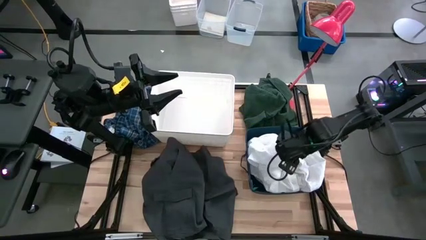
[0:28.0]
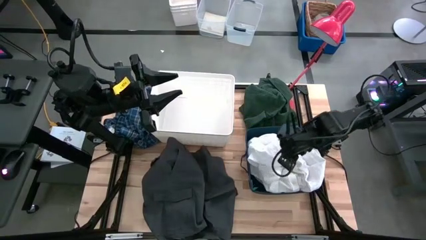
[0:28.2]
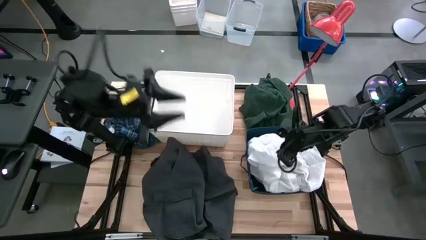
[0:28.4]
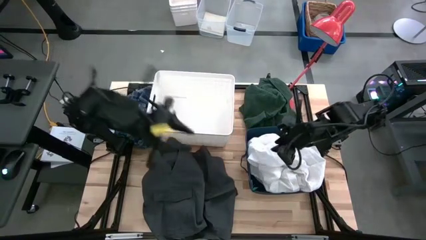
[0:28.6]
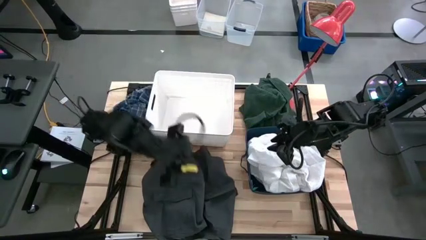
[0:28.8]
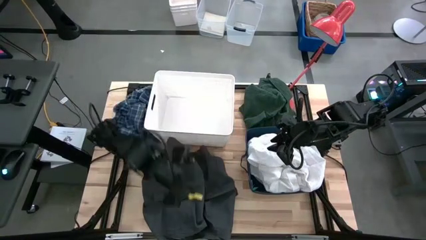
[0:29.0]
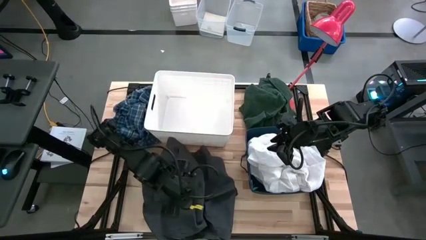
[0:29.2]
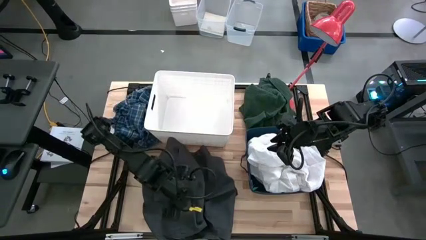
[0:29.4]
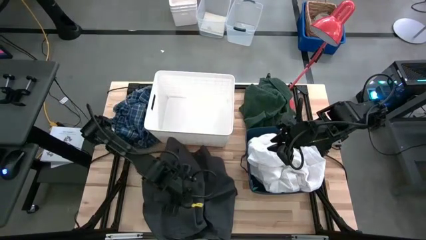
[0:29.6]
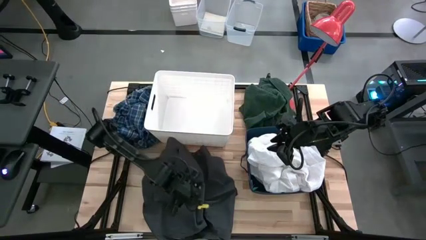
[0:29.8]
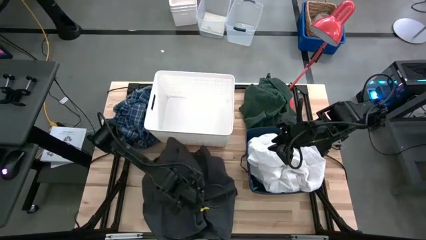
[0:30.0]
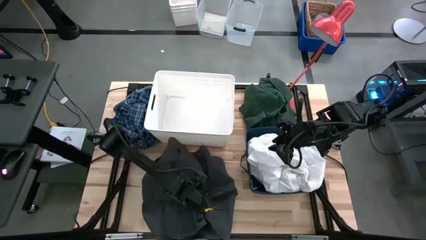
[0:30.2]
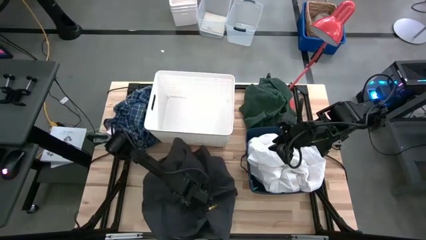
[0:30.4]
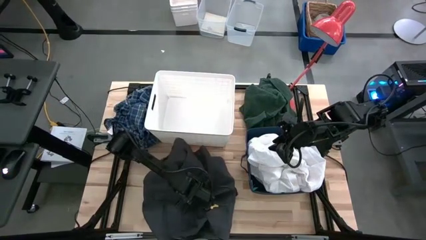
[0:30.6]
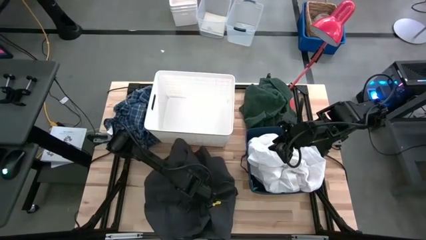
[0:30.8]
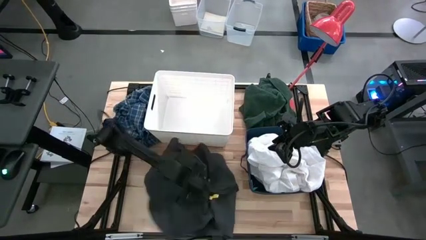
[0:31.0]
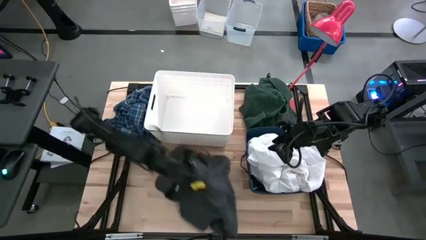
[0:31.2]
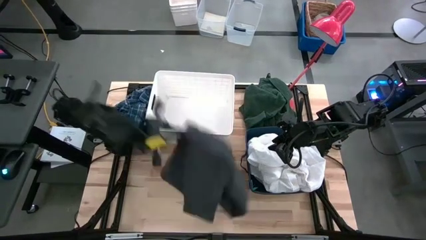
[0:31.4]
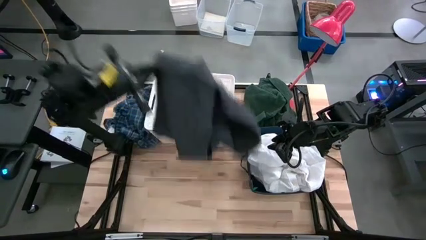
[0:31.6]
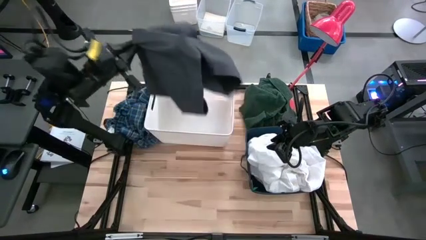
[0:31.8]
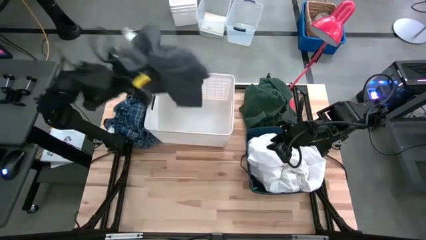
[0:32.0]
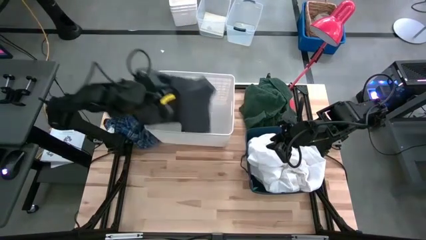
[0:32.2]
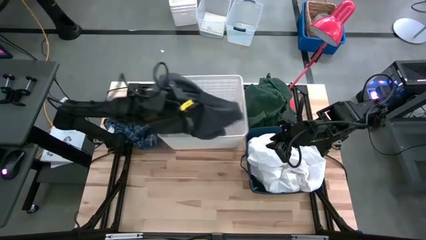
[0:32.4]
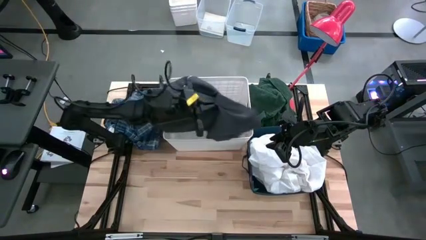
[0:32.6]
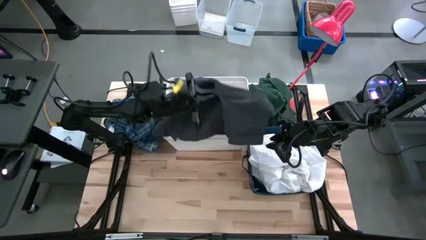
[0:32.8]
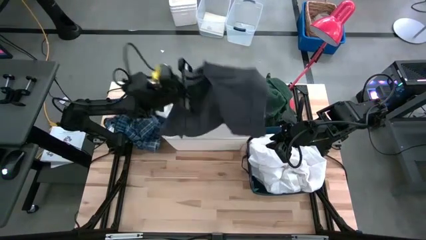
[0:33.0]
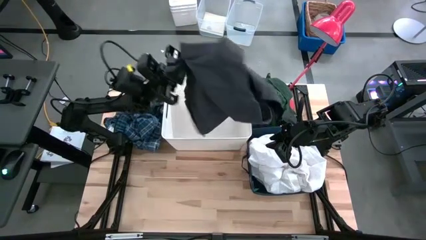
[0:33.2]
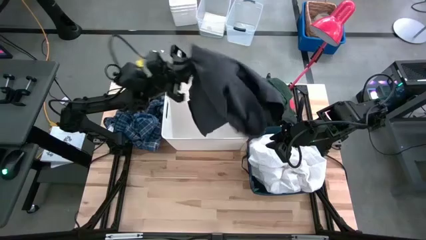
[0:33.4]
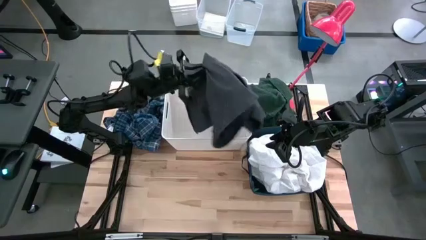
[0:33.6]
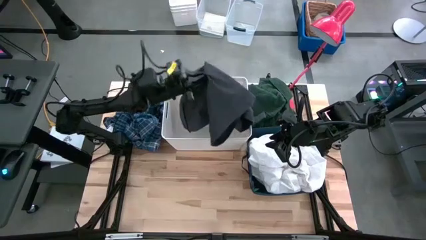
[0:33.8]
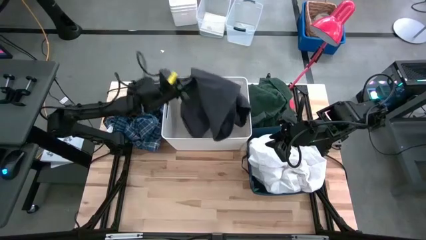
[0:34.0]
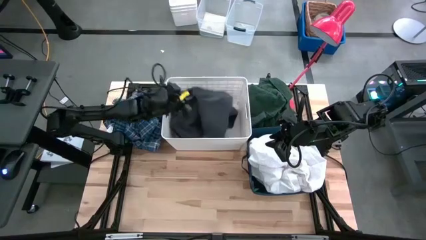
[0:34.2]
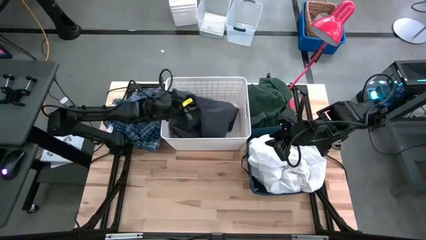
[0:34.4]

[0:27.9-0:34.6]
Task: Sort clothes
Put the black blazer into the white bin

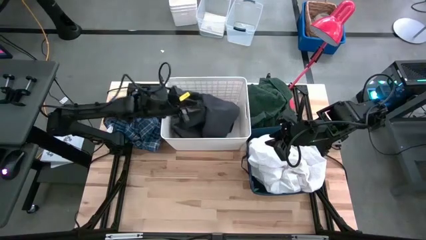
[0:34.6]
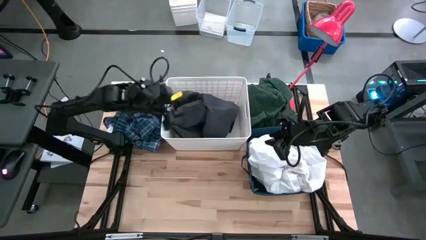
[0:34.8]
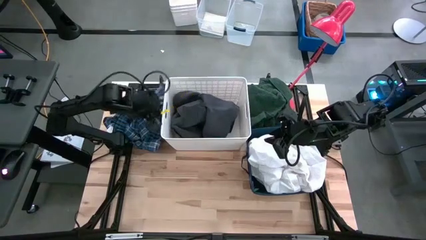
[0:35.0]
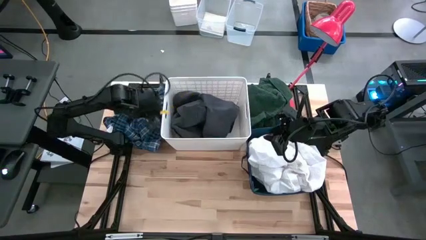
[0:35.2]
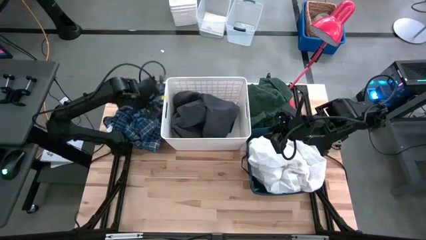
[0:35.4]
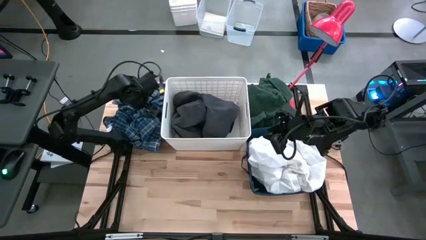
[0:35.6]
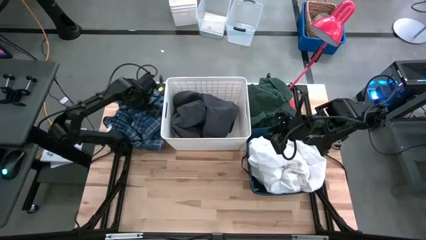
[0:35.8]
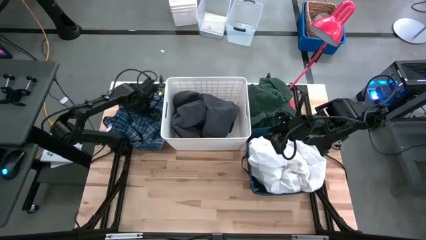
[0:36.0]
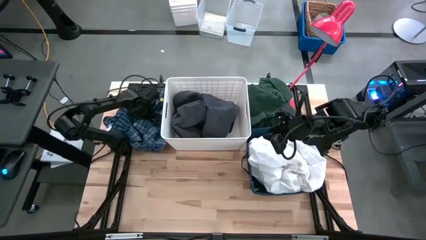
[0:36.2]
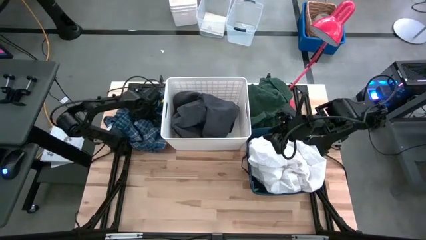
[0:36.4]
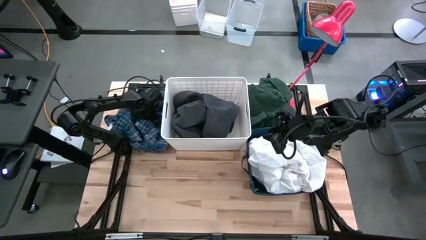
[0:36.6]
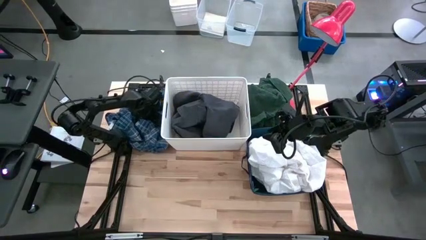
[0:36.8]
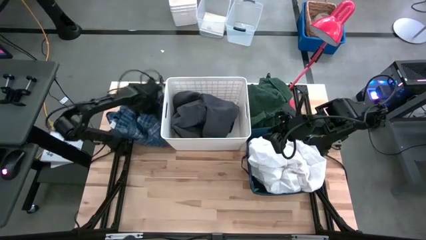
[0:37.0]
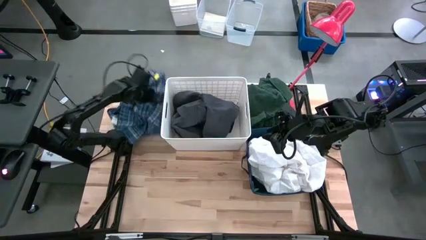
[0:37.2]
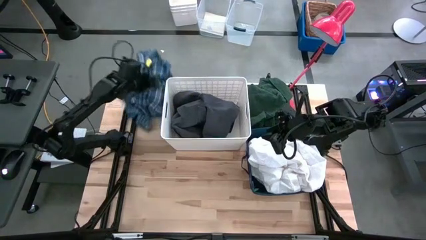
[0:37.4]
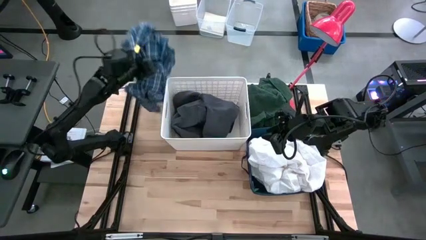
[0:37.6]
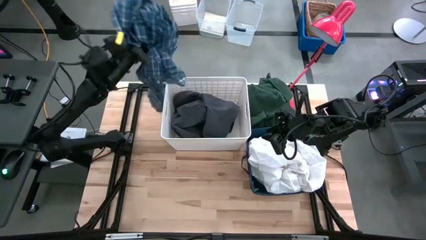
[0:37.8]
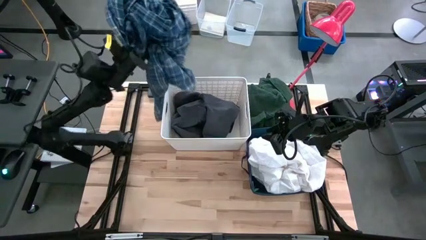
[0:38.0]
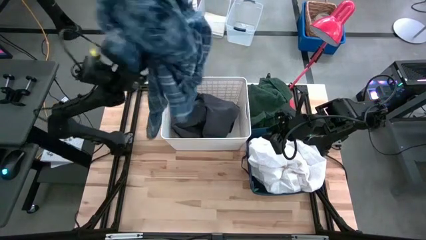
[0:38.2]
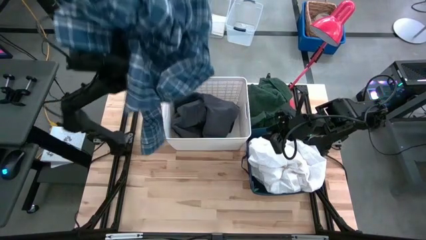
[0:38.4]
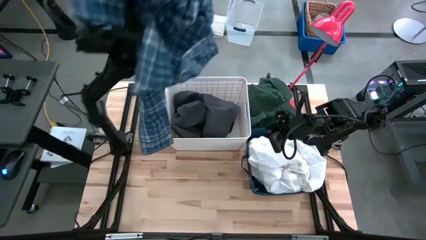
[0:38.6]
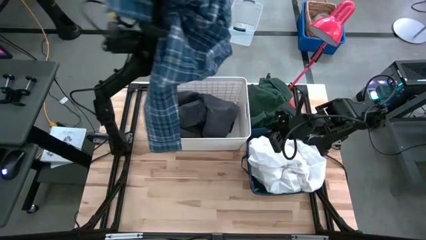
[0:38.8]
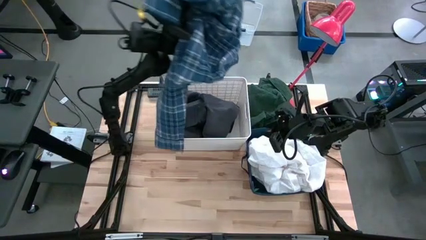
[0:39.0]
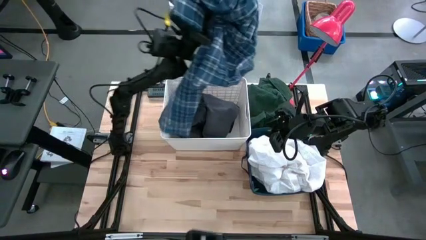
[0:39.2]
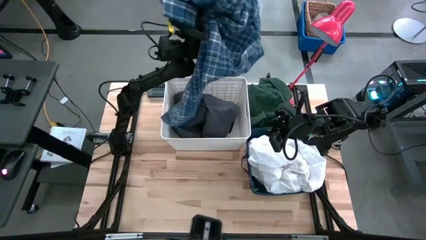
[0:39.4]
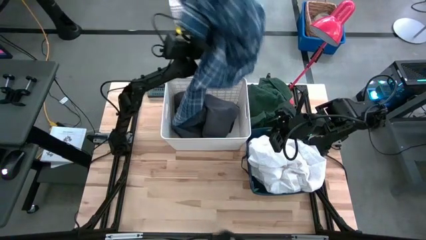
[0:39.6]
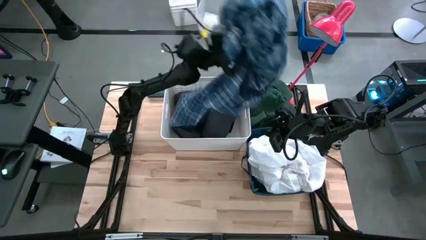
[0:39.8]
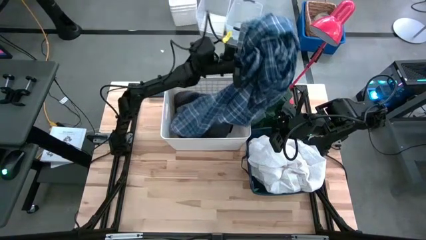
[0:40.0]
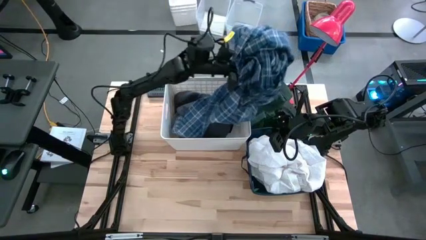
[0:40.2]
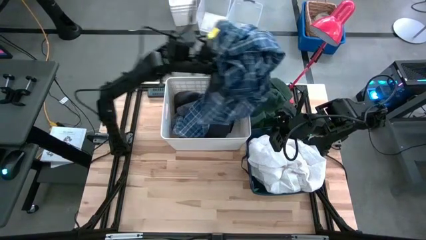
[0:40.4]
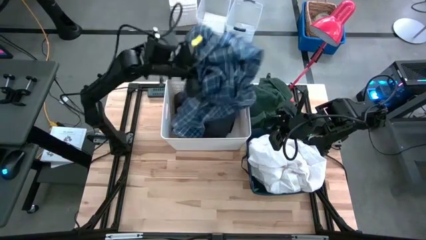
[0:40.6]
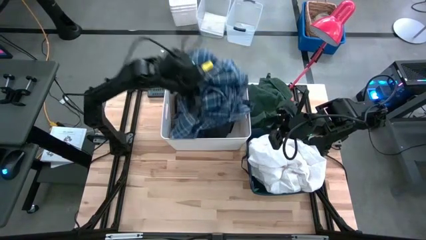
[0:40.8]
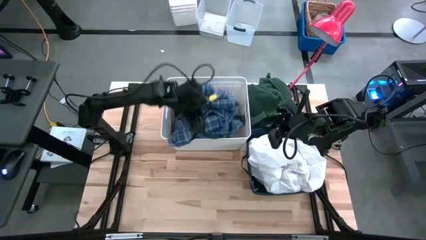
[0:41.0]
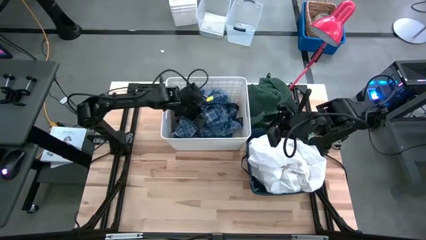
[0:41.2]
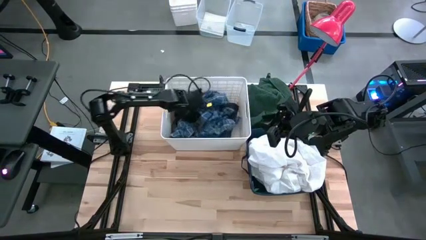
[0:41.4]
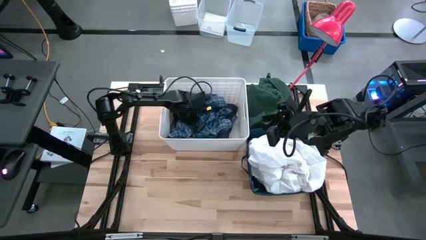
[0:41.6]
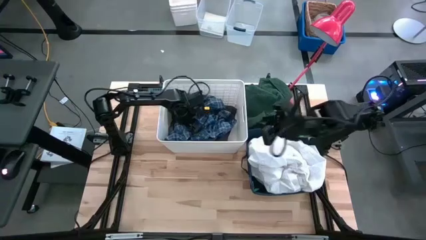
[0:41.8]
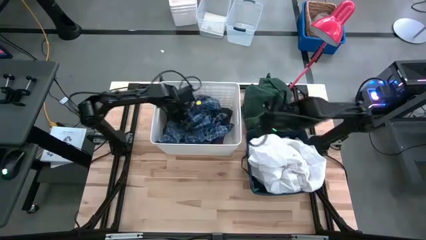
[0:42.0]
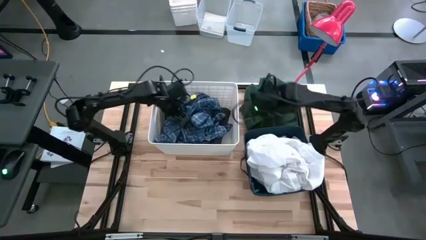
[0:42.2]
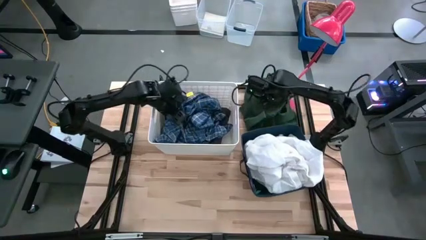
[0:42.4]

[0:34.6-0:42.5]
Put the blue shirt into the white bin

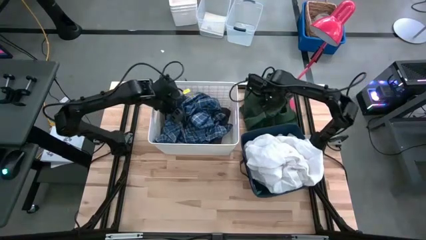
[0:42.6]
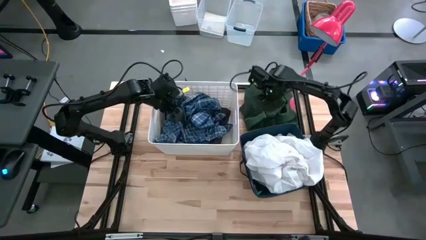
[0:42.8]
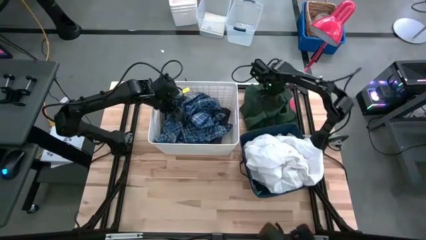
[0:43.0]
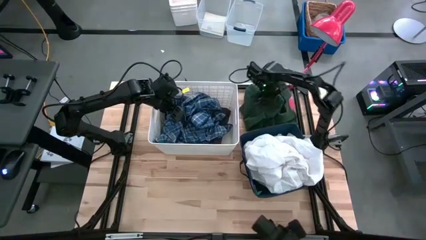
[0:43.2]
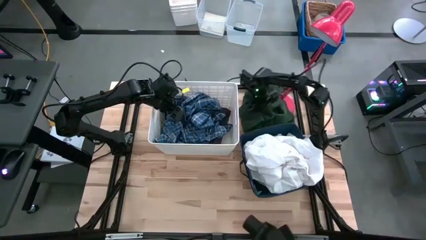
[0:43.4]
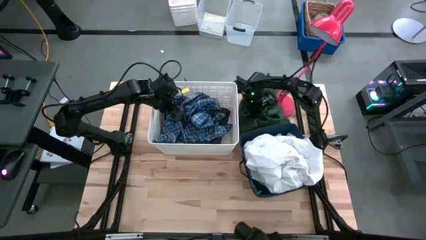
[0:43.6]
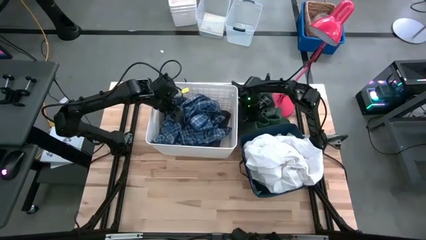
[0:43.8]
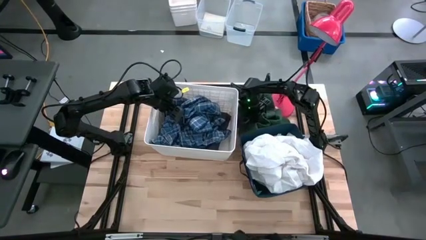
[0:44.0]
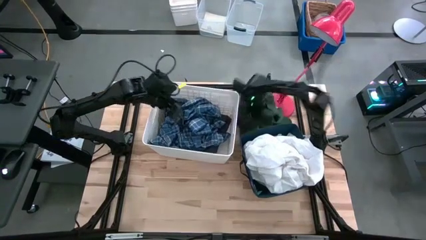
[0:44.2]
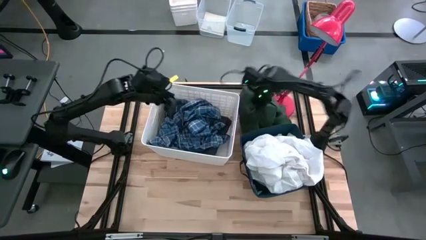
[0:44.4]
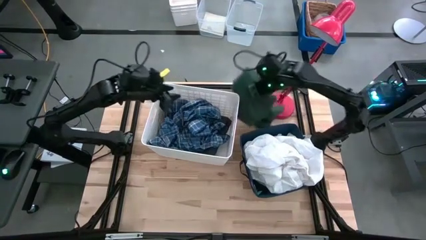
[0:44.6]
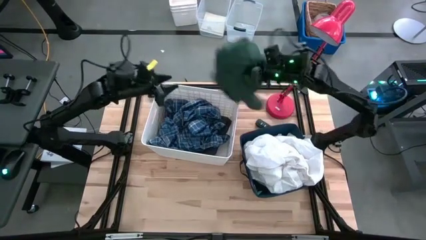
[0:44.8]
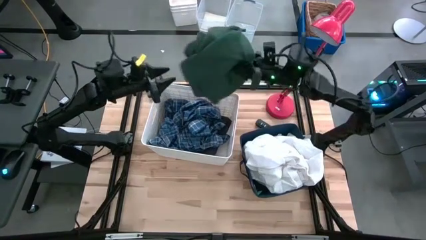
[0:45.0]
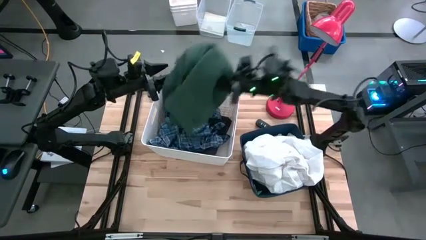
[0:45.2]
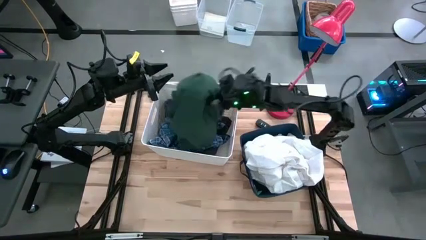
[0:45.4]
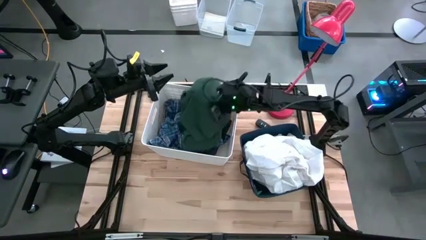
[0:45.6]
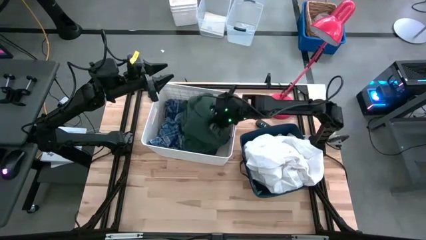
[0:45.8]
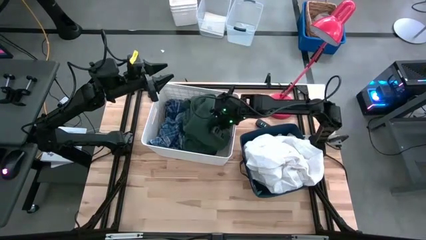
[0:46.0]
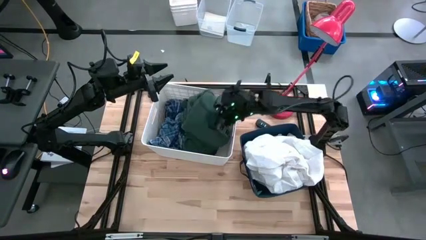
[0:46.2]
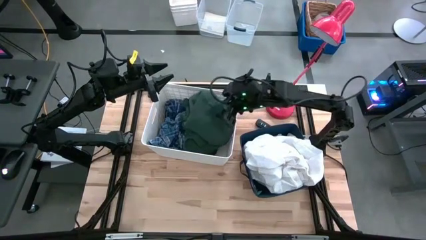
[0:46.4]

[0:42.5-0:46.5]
Put the green shirt into the white bin
